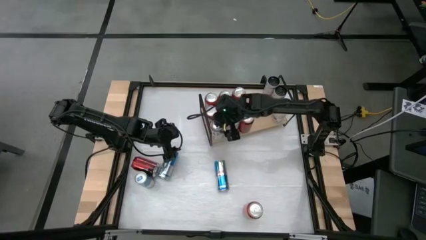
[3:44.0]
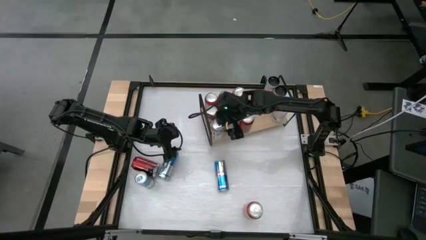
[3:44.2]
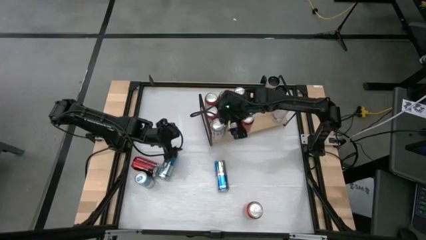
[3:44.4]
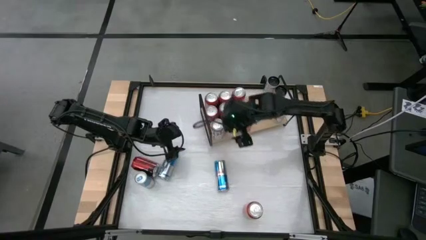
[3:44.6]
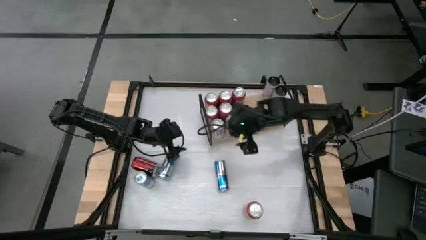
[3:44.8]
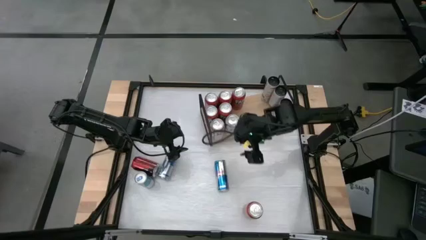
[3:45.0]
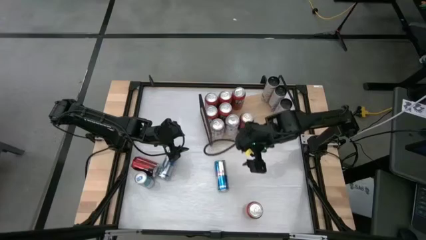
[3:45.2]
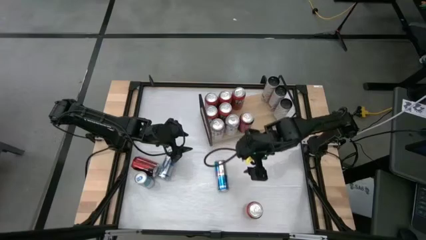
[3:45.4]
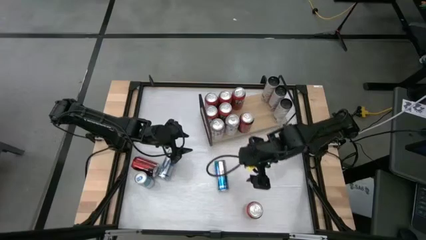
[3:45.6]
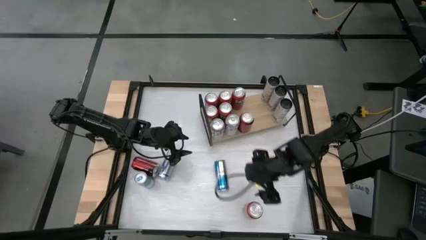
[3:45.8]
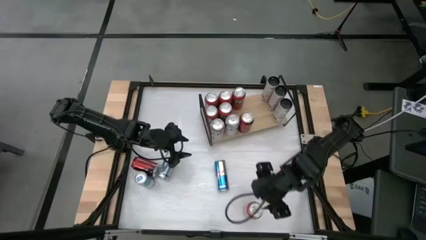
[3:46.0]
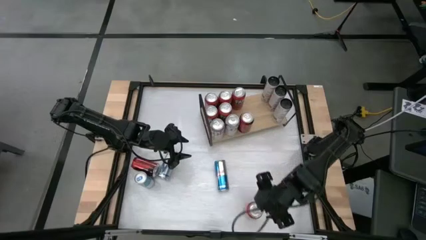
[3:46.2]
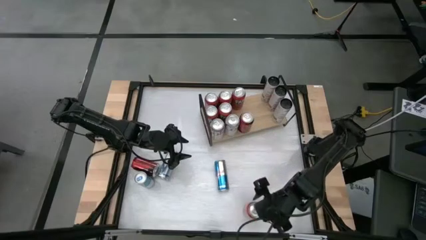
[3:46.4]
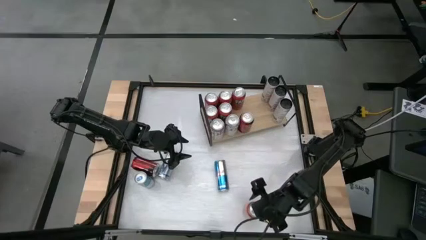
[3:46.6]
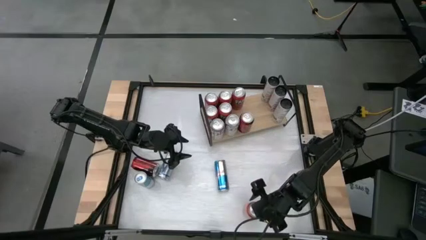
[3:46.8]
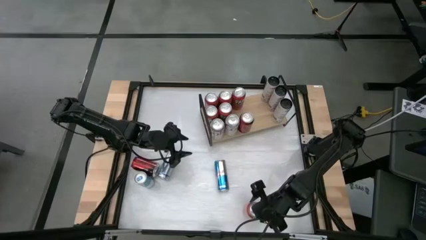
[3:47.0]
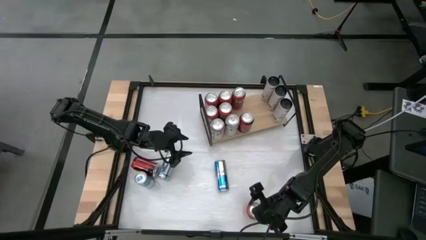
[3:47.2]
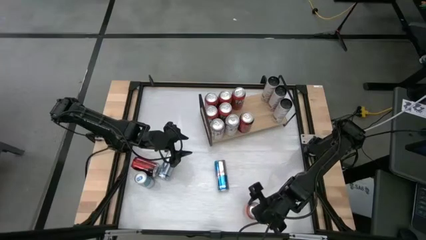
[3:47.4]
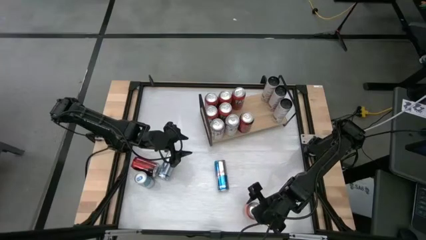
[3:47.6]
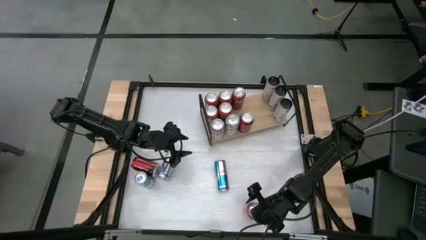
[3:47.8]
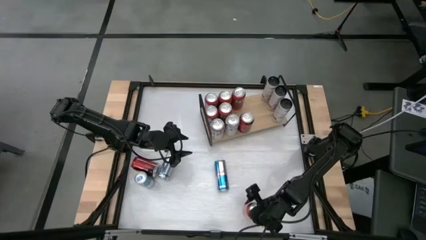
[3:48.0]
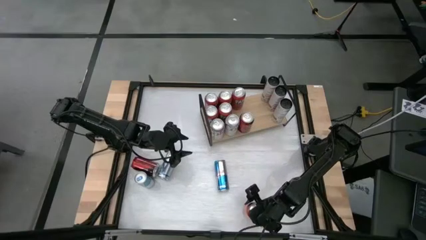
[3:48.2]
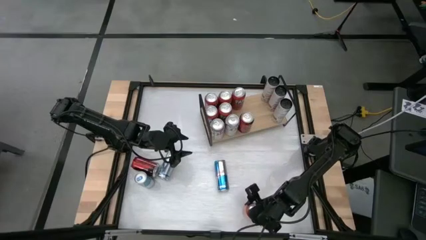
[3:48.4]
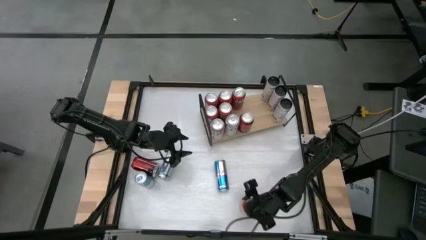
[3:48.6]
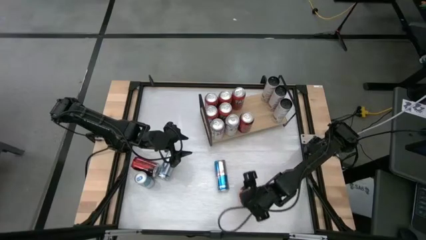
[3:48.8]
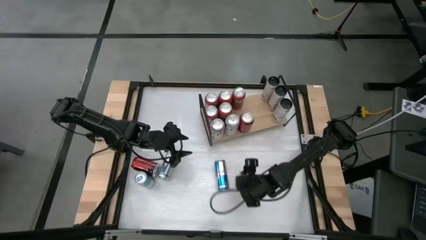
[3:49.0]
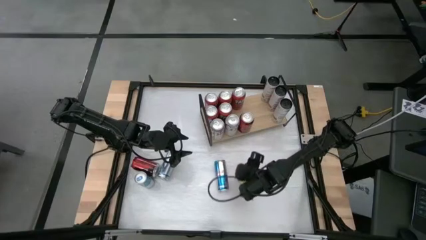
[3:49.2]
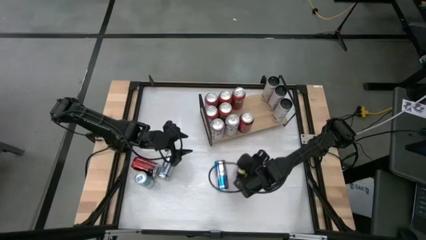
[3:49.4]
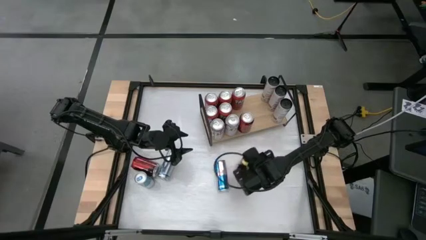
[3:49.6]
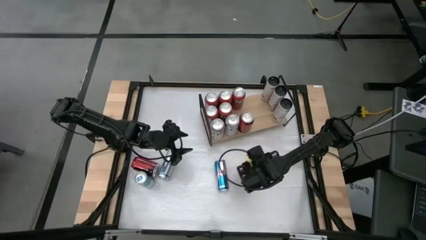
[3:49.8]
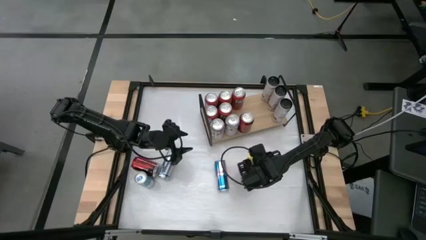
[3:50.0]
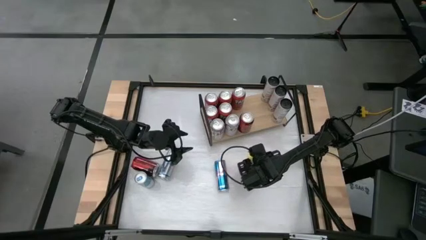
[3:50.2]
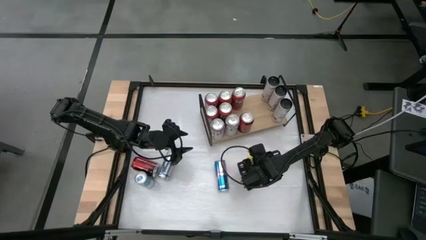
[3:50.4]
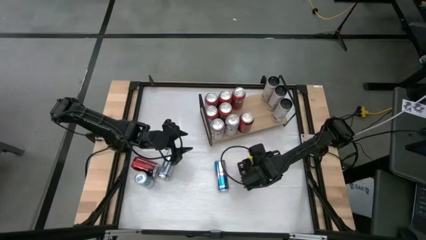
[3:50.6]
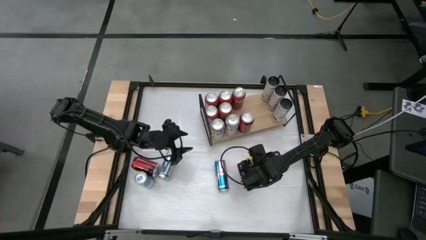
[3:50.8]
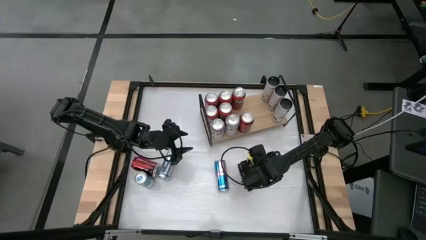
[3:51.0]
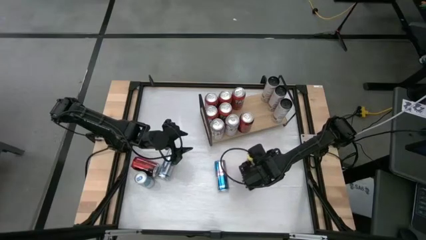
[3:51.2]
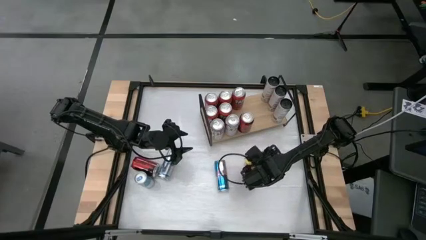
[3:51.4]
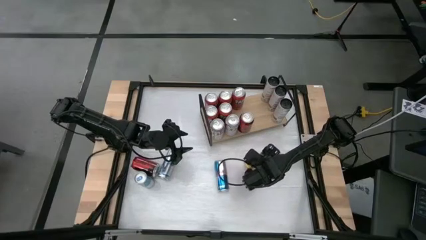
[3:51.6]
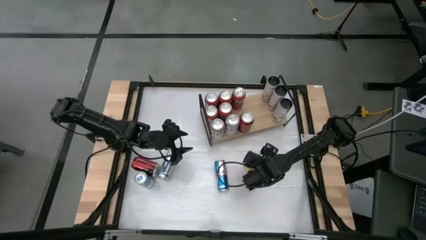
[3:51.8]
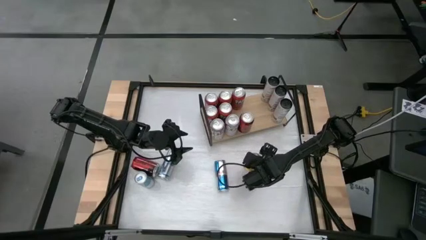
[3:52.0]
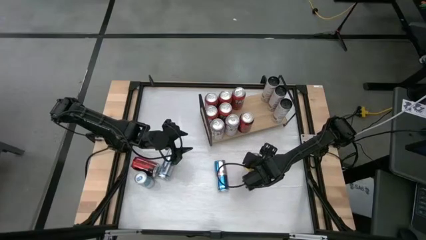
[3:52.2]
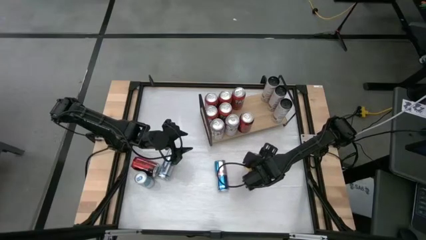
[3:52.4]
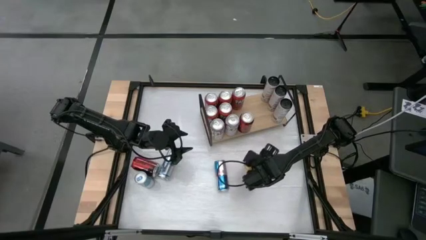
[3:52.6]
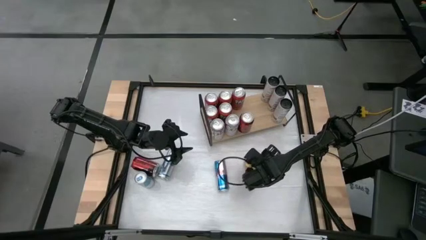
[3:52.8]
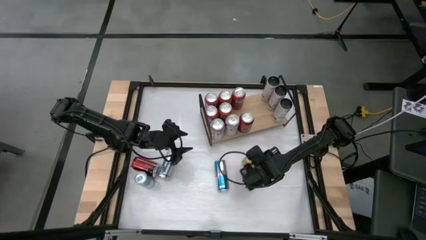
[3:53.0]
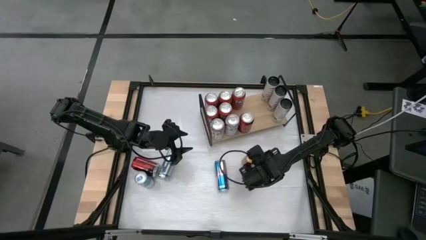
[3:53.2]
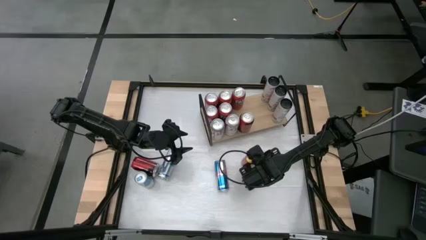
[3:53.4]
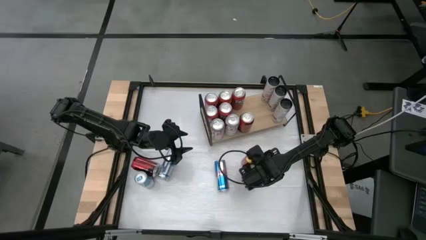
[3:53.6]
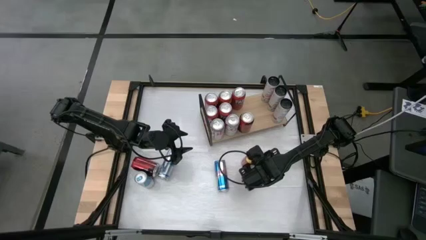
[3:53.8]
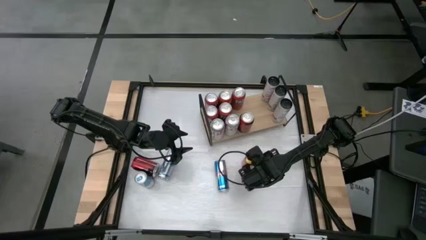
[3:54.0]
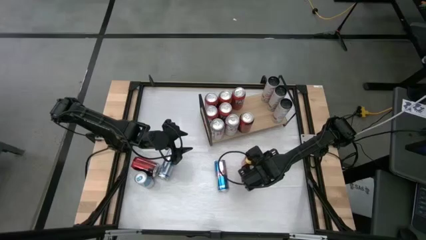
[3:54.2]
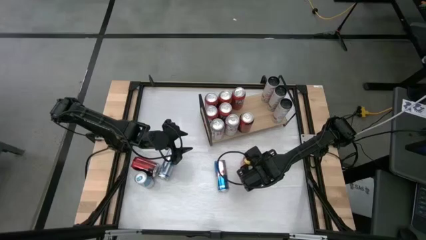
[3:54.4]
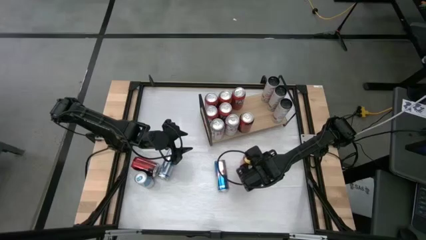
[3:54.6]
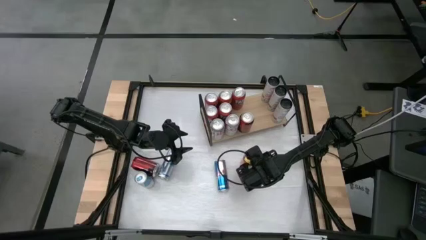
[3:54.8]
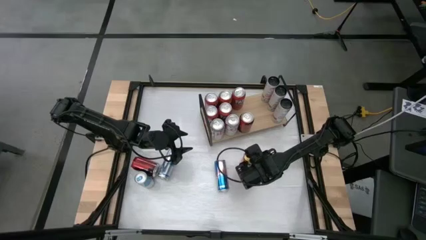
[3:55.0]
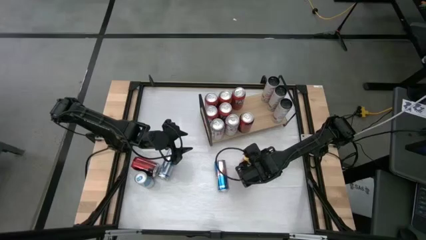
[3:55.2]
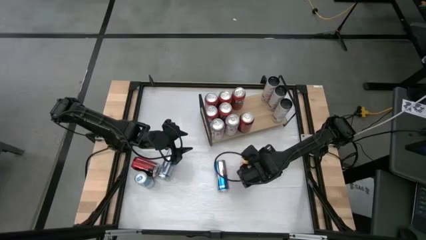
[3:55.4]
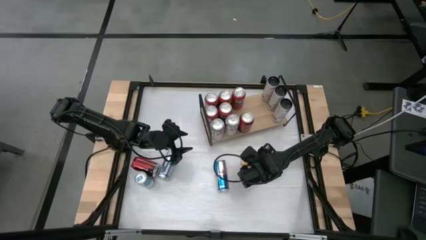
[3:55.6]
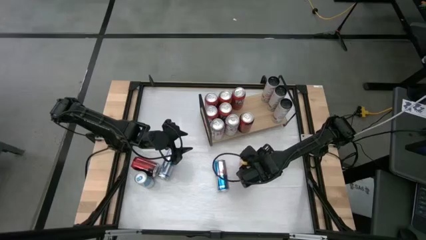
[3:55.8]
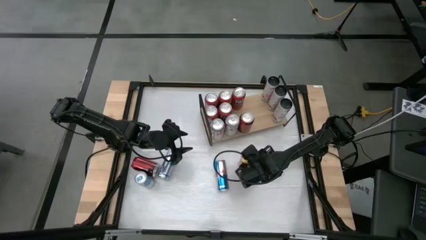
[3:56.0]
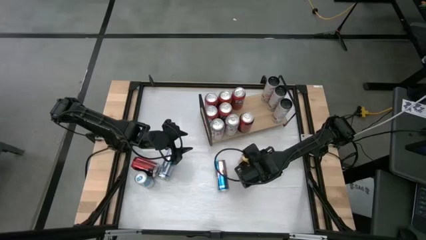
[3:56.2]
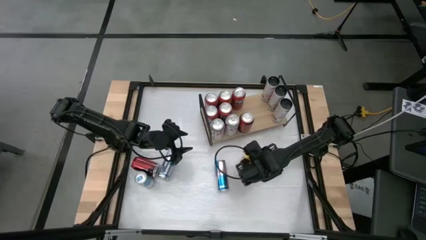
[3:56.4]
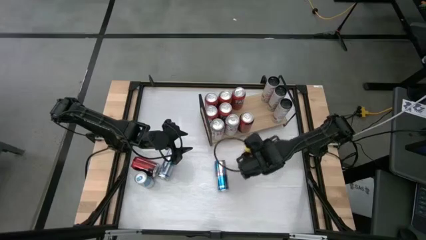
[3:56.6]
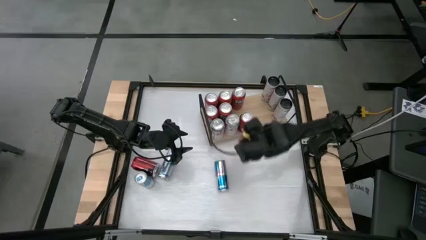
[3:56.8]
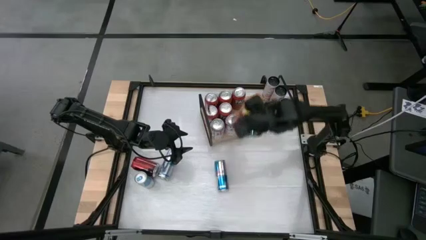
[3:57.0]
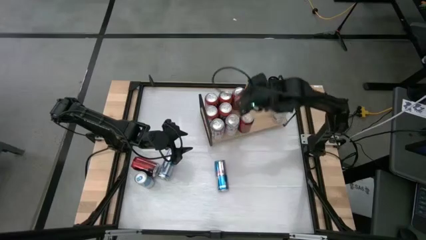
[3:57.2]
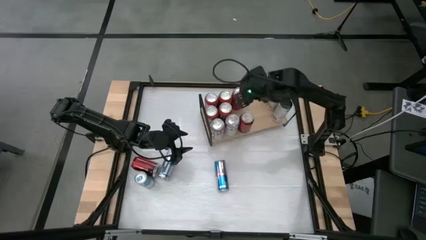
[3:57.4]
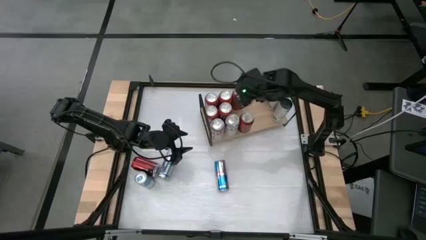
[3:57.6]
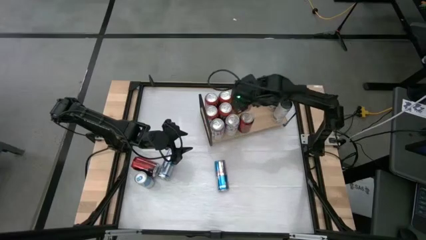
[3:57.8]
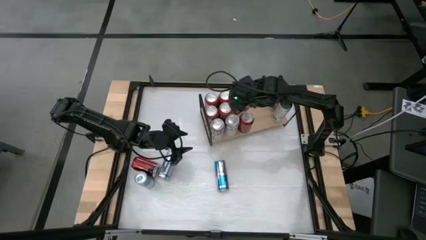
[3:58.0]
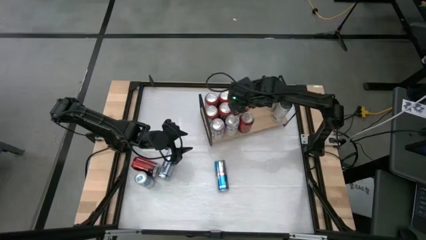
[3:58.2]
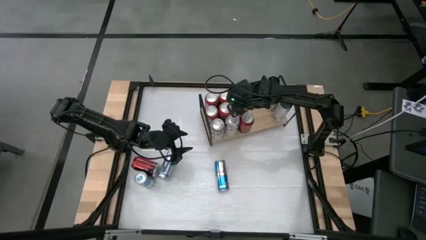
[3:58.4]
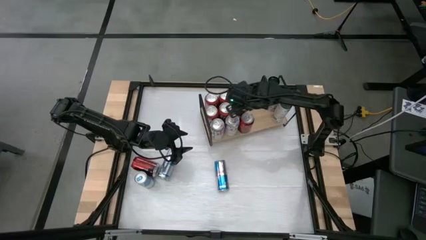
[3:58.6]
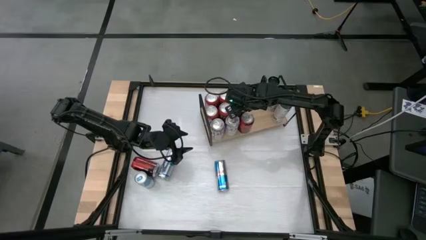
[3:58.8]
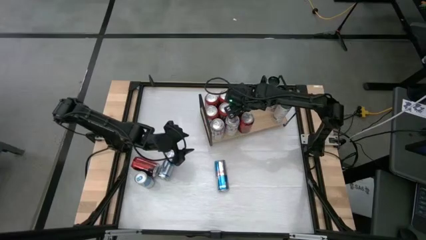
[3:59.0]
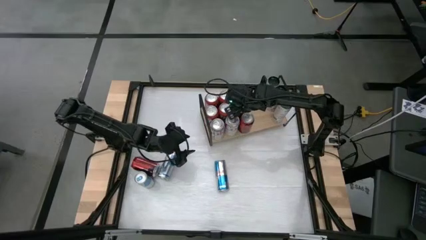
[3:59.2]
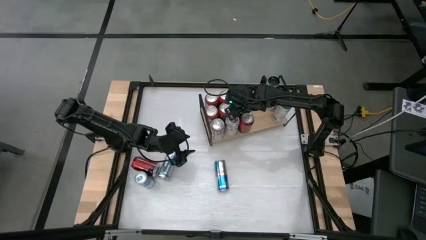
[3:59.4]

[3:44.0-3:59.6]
Task: Place canned beverage on shelf
Put the orange soda can on the shelf
